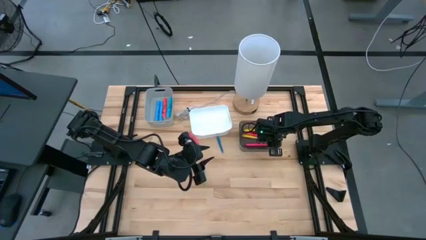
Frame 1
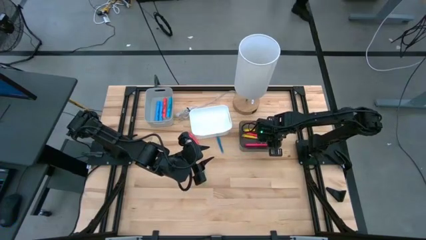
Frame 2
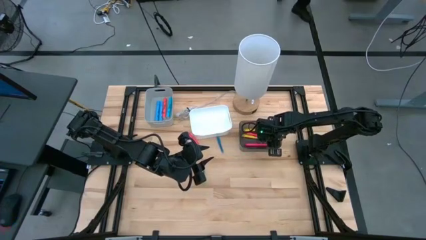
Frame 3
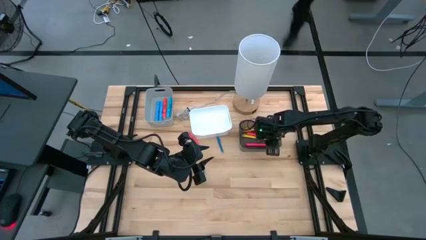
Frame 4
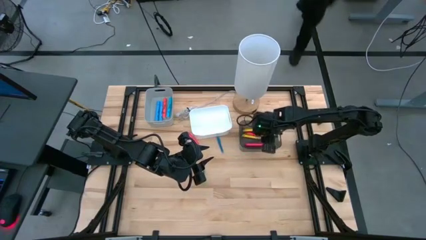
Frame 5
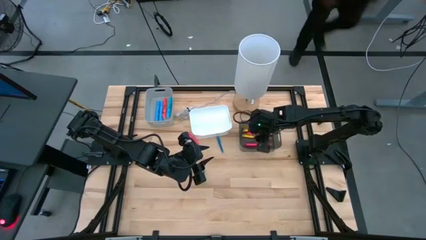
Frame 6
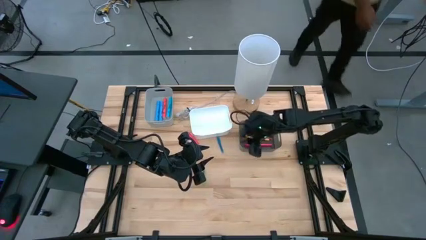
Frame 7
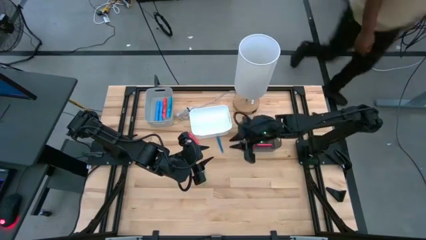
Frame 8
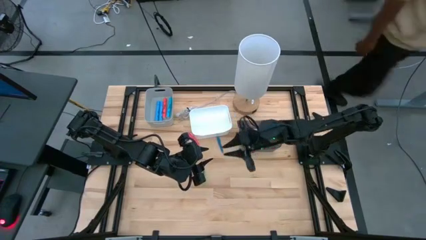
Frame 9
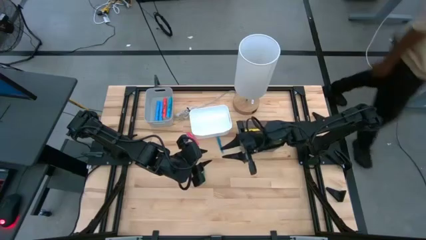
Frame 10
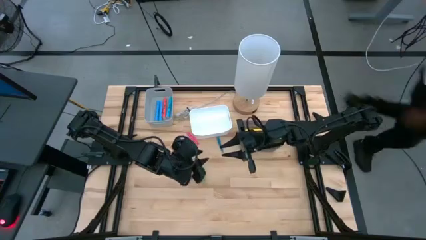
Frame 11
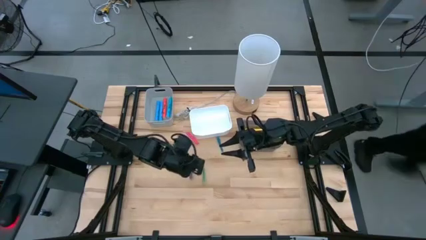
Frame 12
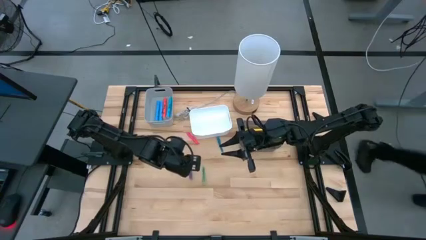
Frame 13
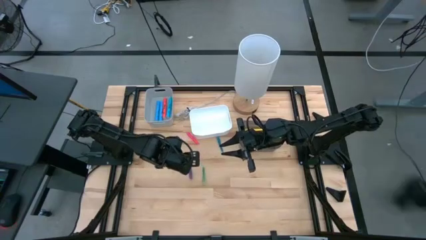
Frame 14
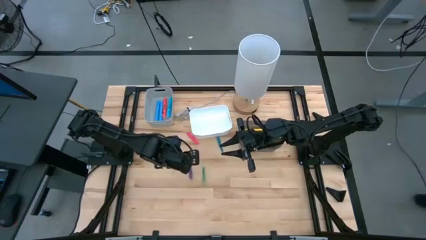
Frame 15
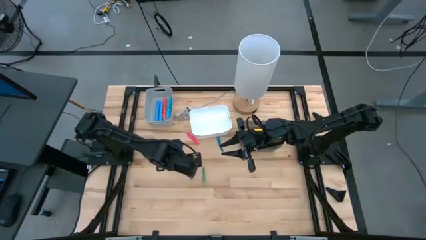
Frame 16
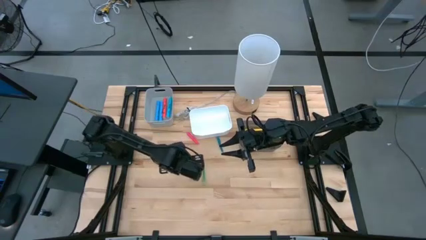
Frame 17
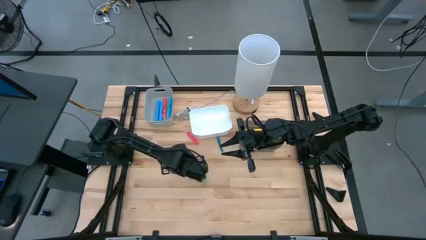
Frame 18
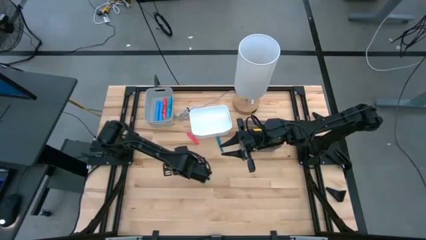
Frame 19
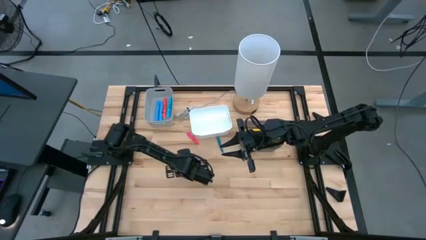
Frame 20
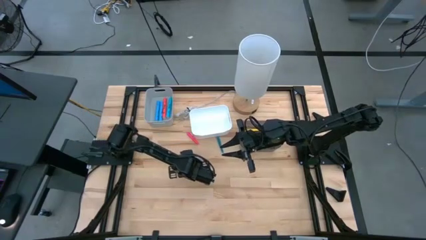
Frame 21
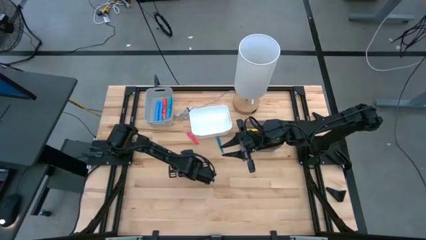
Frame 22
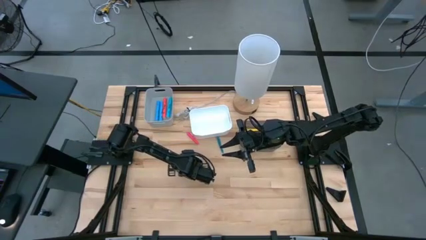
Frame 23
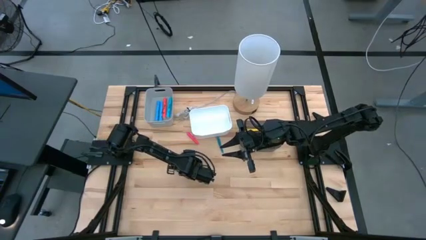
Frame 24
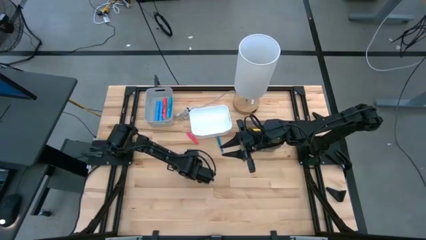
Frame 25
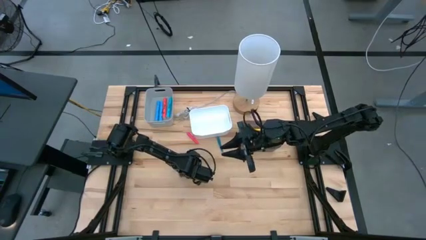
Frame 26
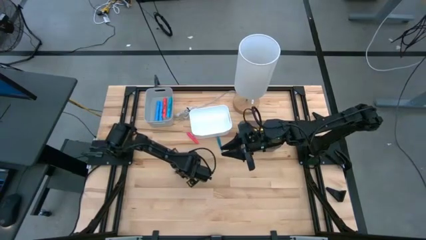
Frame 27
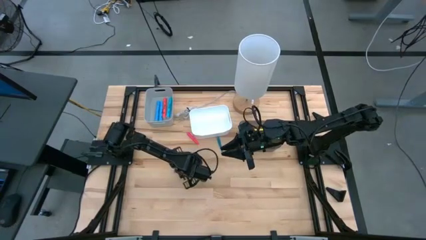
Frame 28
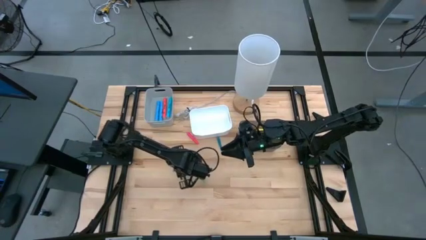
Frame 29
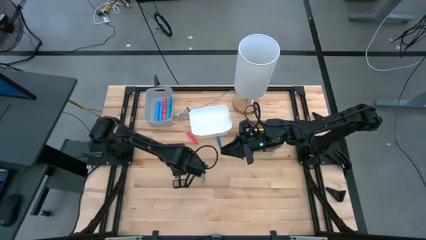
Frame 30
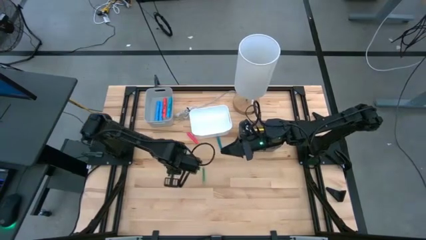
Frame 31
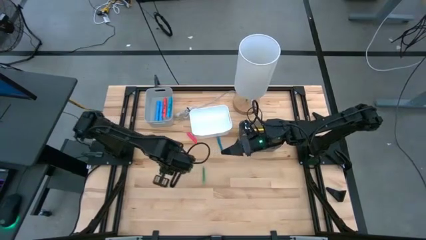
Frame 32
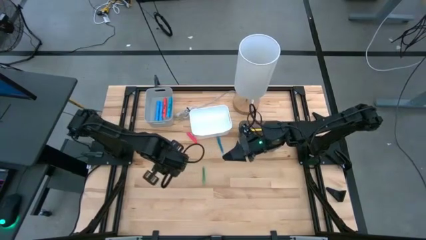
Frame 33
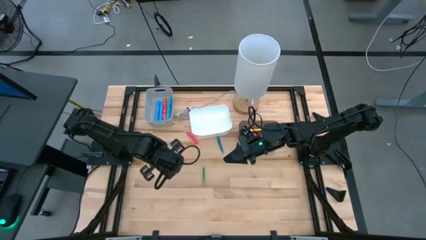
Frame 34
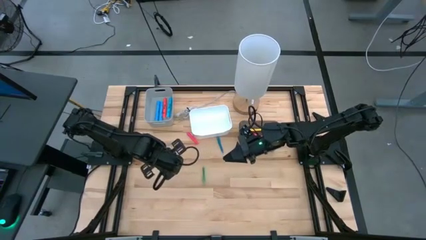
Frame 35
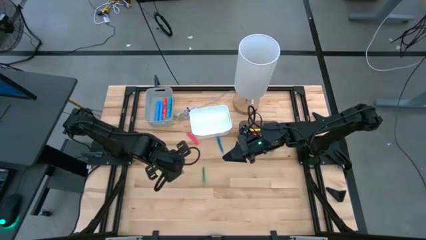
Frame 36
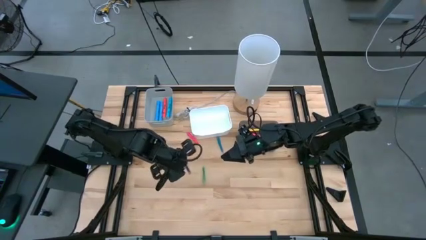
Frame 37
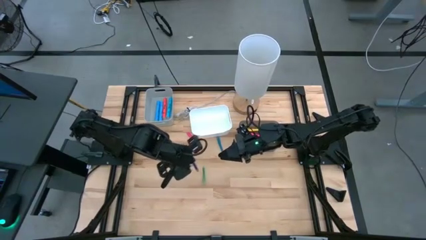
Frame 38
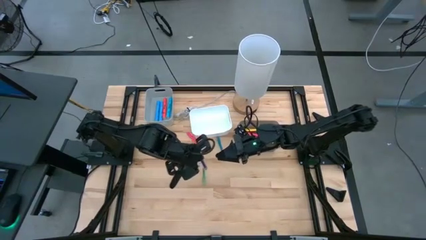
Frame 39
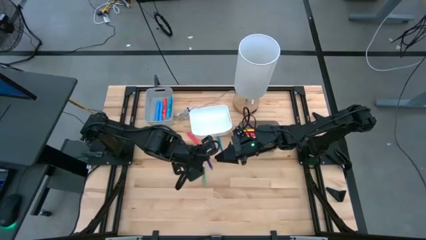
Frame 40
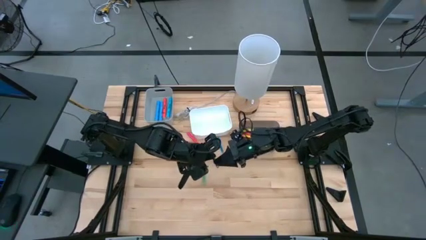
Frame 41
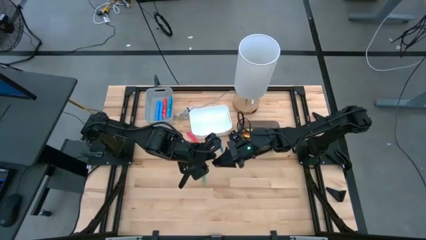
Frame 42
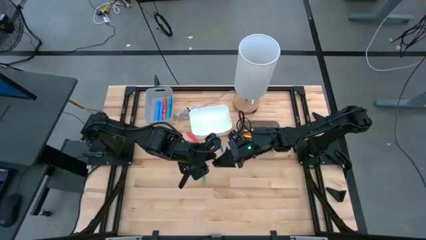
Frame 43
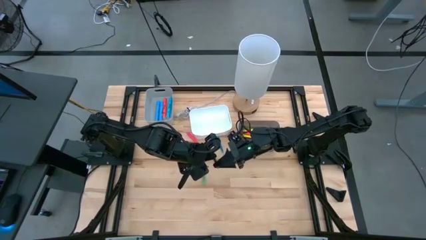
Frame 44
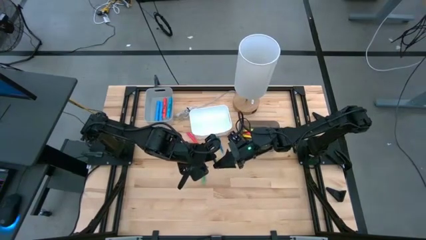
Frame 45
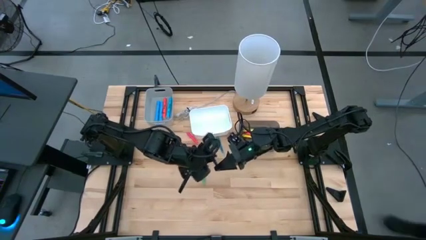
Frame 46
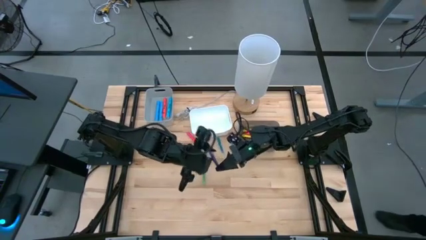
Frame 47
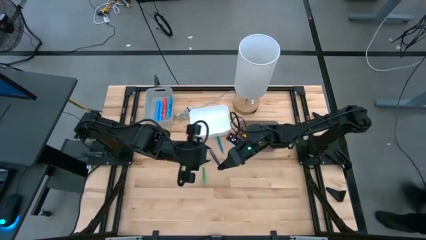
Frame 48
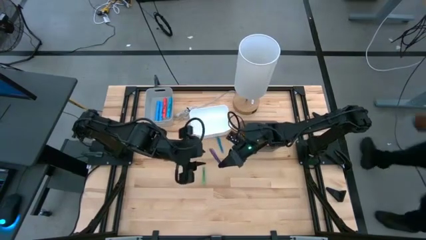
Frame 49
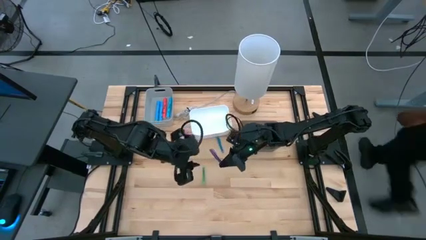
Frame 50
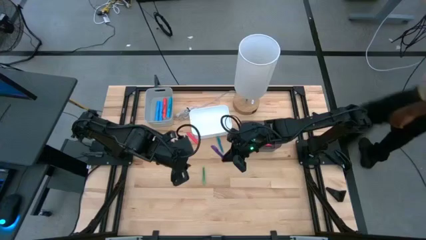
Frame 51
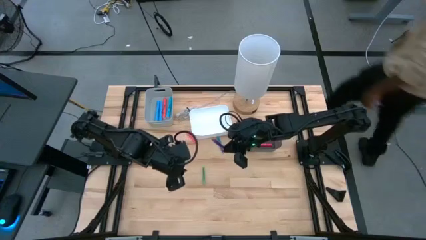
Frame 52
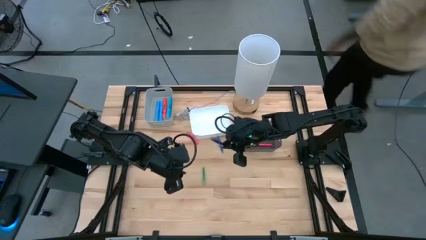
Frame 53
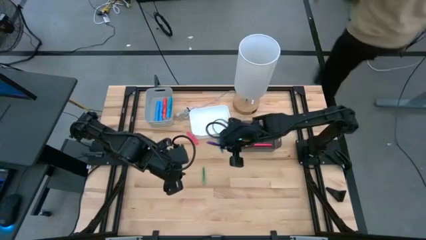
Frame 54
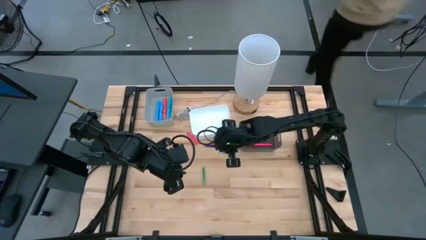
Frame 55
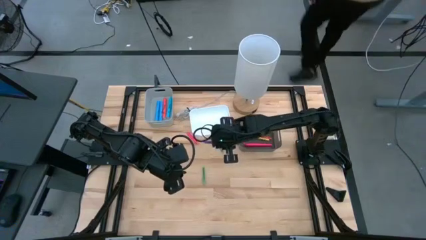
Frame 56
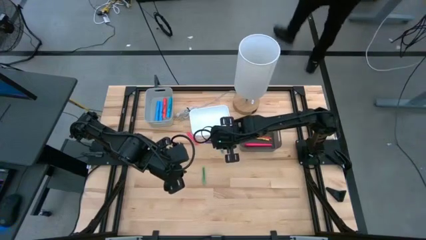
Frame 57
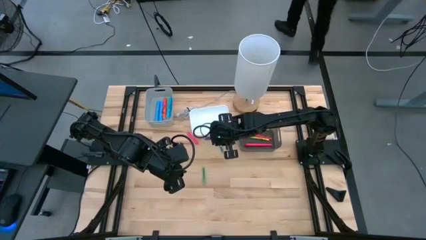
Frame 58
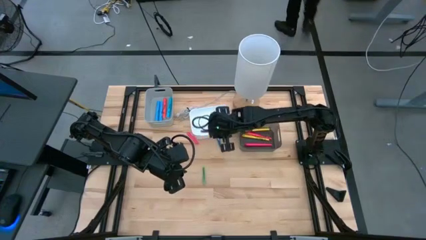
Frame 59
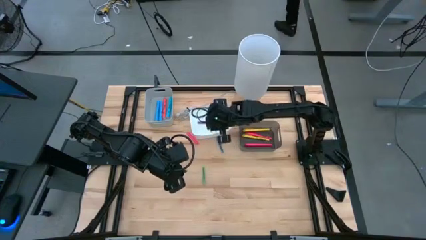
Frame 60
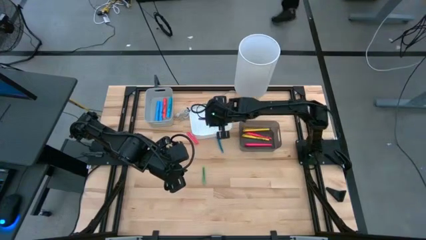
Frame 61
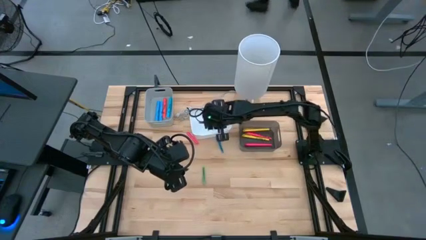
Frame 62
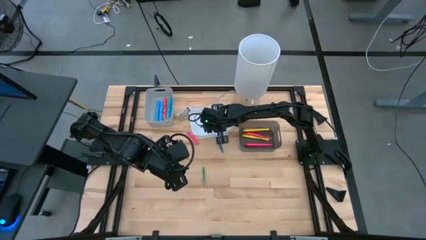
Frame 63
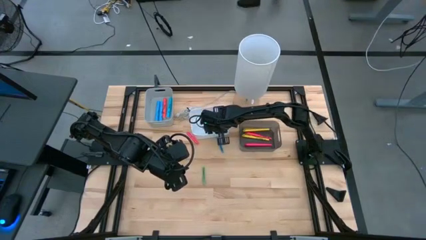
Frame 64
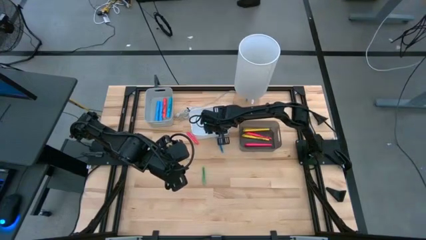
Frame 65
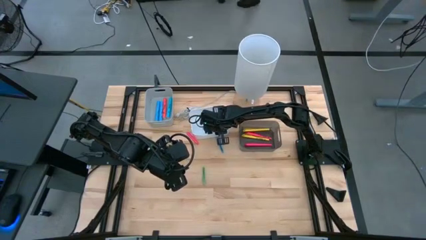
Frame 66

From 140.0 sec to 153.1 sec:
Task: Pick & Place Markers
Put the transparent purple pen into the white bin
